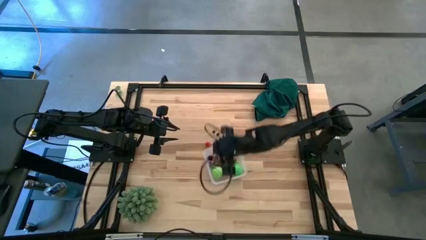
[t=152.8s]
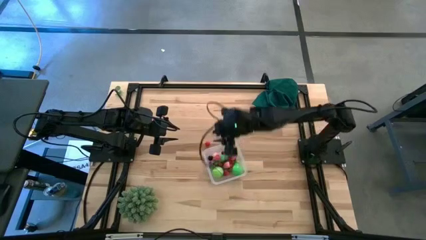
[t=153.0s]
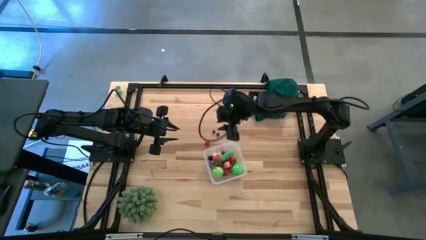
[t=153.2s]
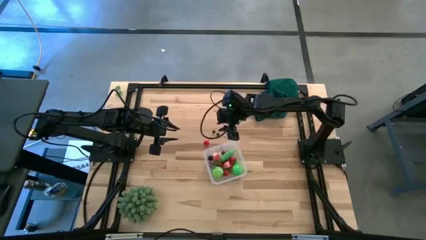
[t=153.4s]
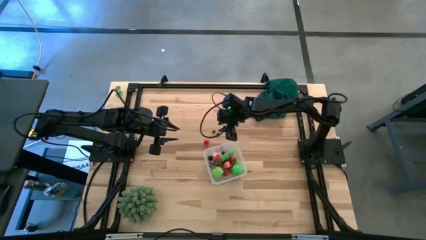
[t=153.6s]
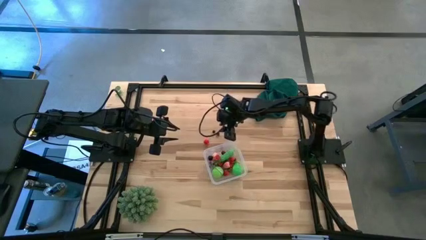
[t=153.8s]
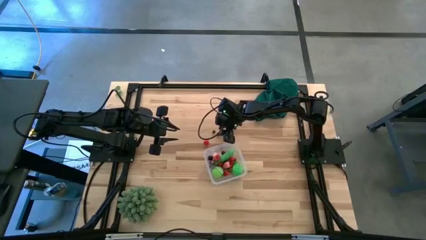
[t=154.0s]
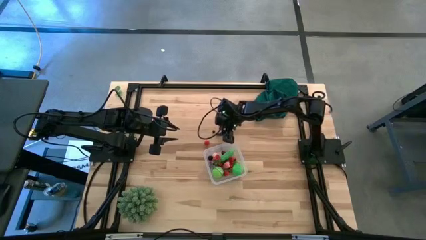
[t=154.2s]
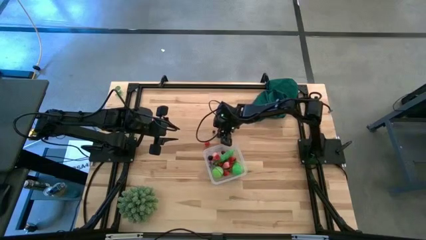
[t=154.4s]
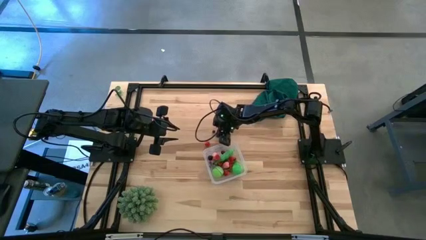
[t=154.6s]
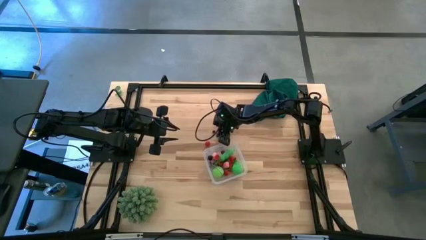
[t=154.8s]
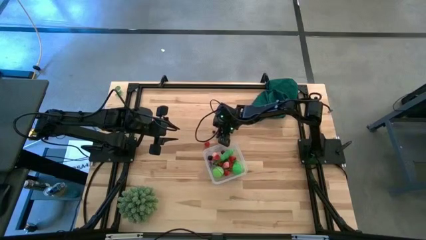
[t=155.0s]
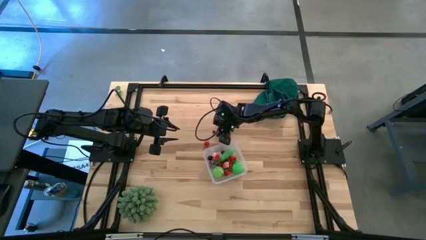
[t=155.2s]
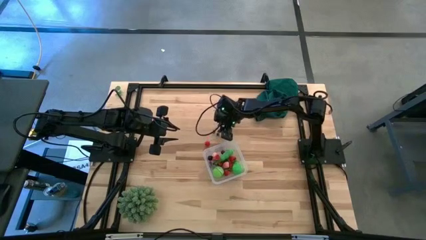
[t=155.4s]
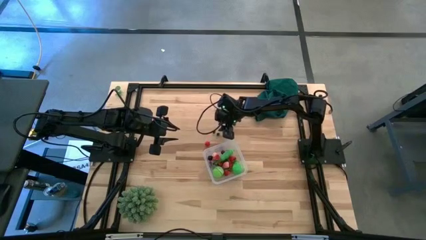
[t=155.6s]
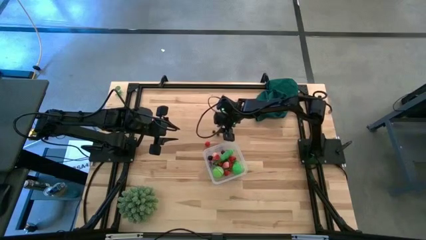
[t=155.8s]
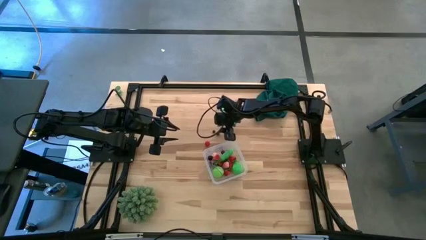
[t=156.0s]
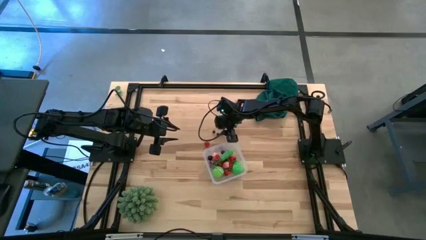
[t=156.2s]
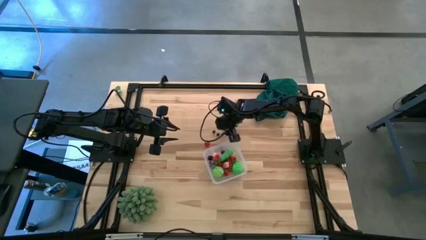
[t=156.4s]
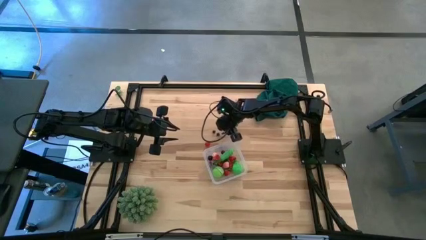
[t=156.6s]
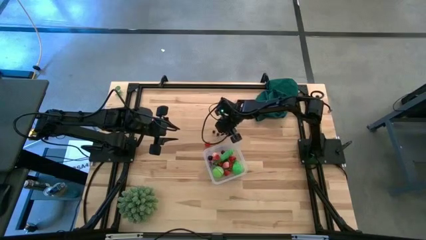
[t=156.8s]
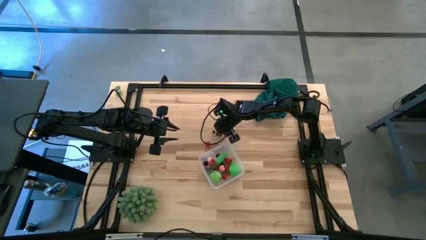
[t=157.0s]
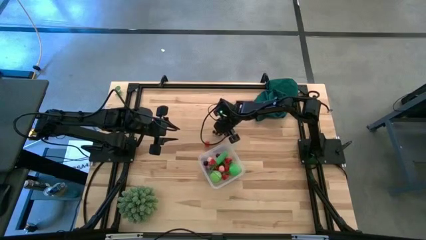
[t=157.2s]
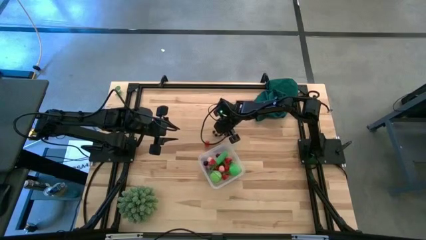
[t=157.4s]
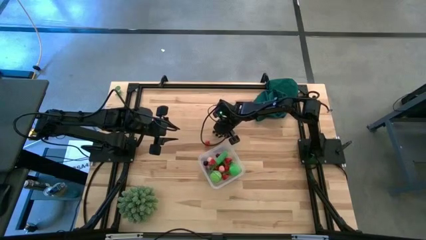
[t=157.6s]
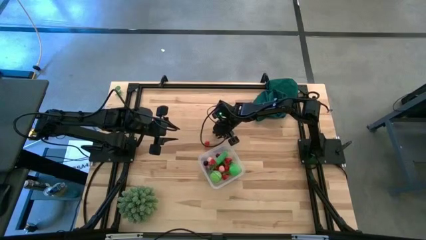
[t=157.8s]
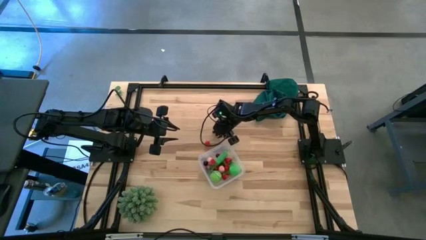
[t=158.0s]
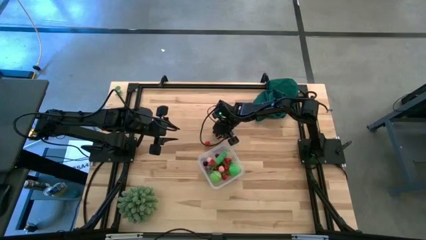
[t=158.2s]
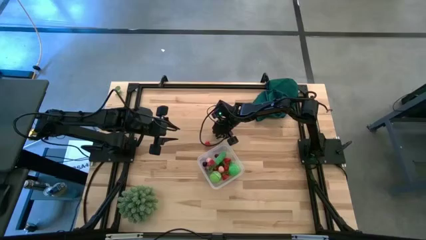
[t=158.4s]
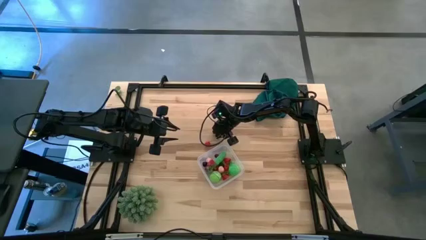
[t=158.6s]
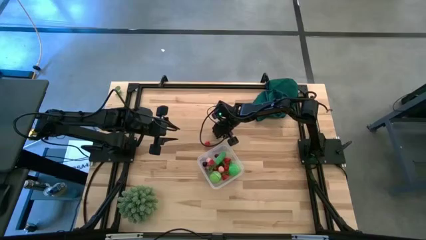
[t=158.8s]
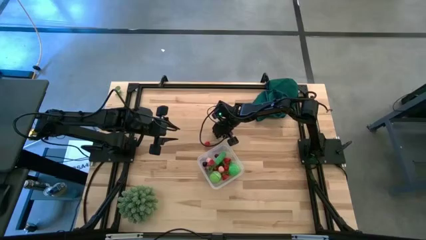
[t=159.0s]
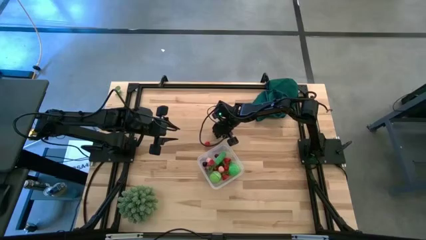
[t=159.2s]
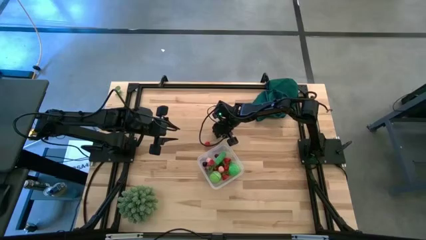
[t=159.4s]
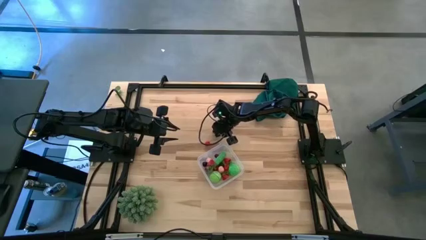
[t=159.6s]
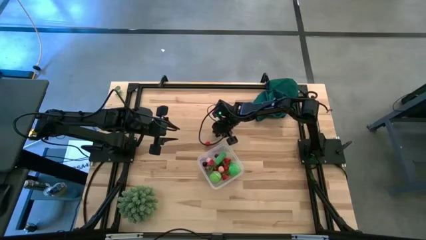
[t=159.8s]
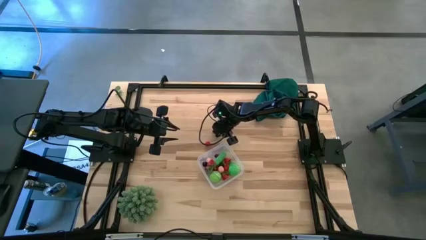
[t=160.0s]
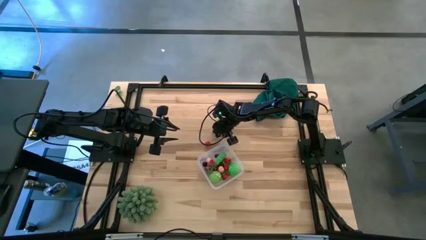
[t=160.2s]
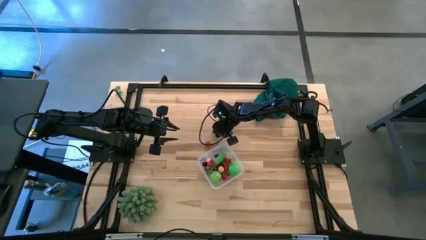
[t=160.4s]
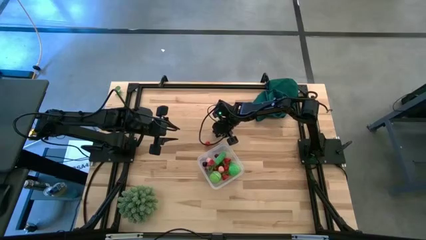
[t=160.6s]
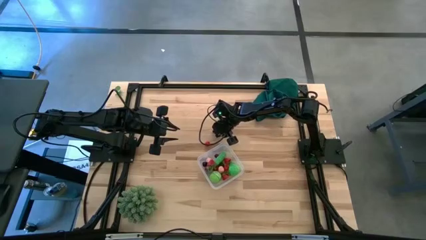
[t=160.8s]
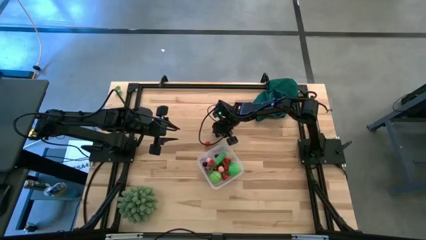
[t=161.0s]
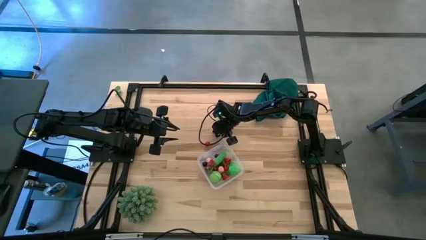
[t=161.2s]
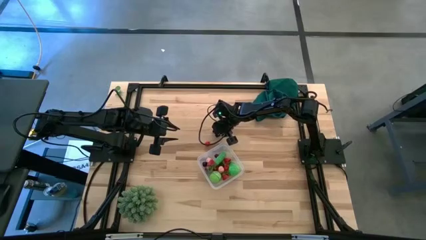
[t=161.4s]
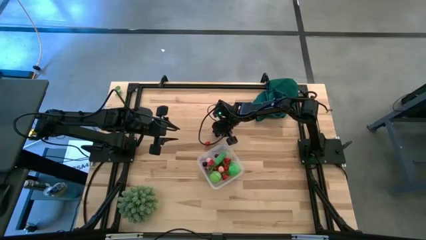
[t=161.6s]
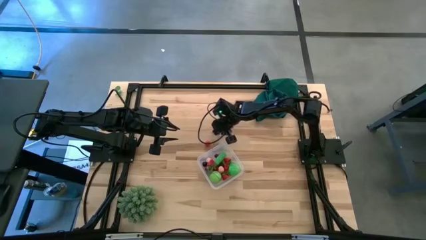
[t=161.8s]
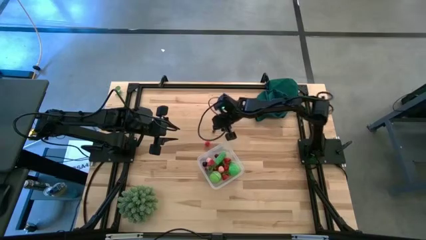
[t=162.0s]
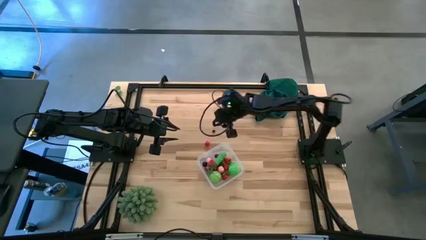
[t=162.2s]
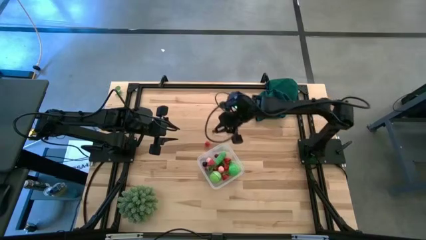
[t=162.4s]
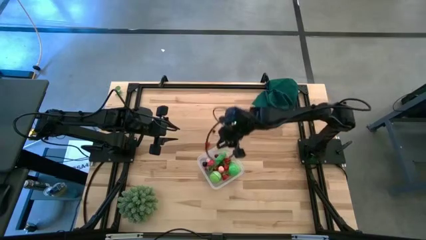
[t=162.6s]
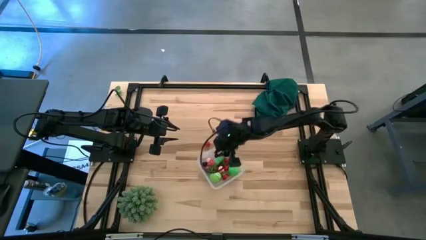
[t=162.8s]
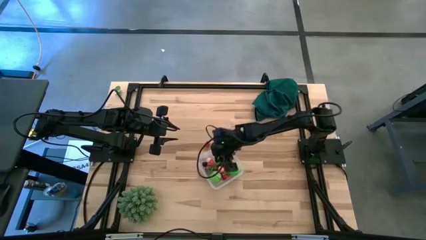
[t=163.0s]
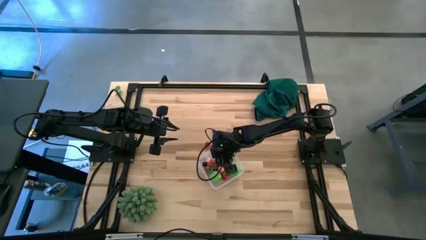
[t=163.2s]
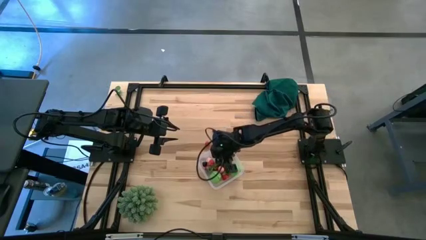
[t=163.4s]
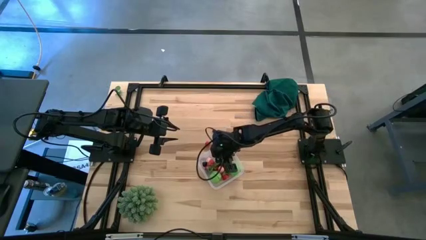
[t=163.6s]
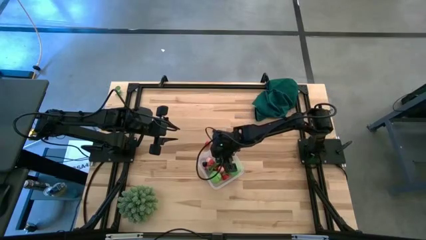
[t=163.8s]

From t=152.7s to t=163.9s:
Task: Pick and placing Produce into tupperware
Put the blueberry into the transparent container

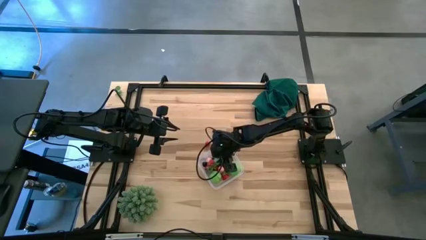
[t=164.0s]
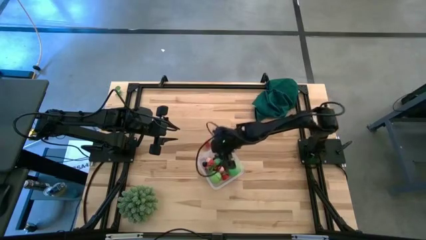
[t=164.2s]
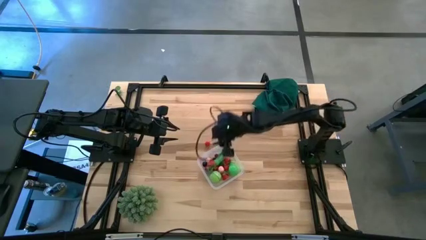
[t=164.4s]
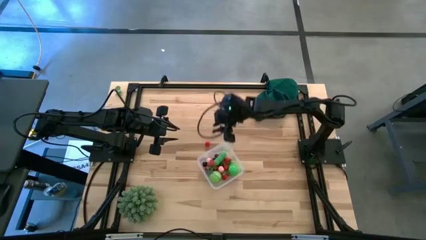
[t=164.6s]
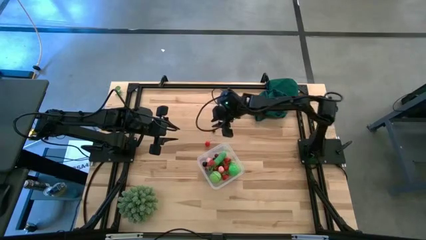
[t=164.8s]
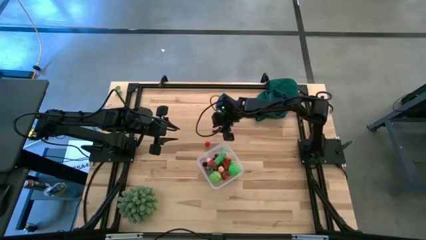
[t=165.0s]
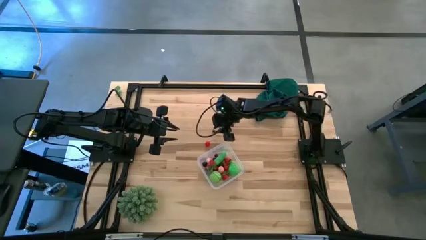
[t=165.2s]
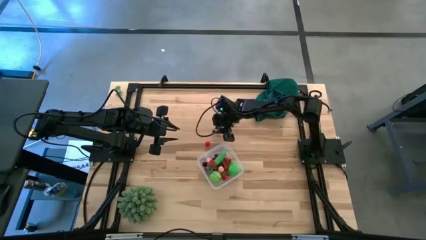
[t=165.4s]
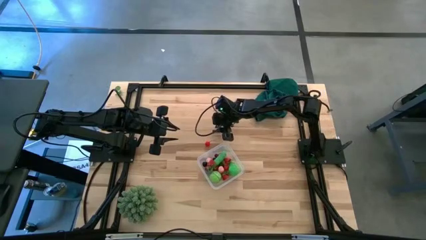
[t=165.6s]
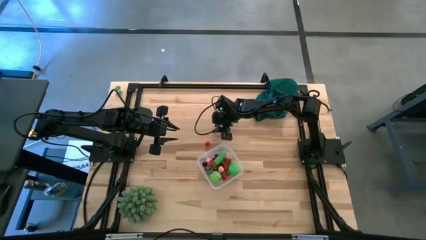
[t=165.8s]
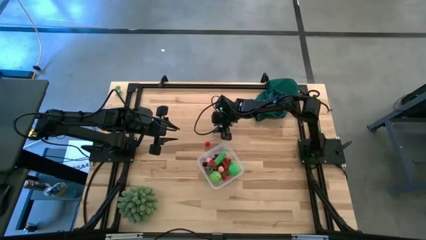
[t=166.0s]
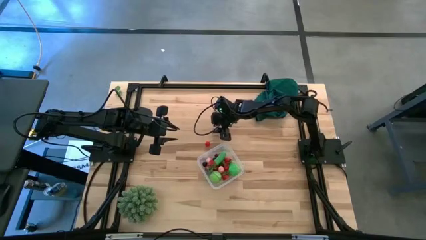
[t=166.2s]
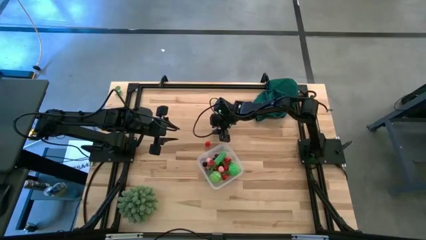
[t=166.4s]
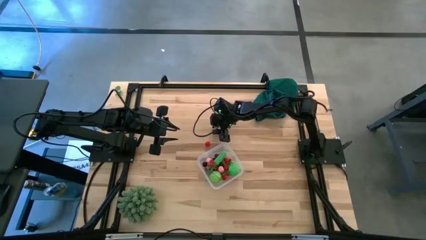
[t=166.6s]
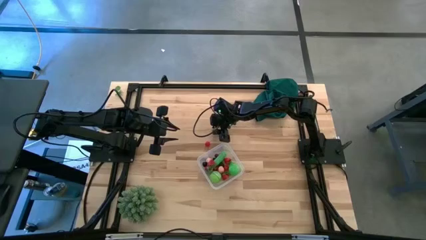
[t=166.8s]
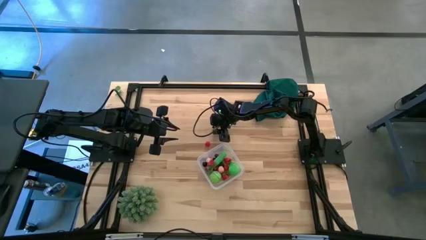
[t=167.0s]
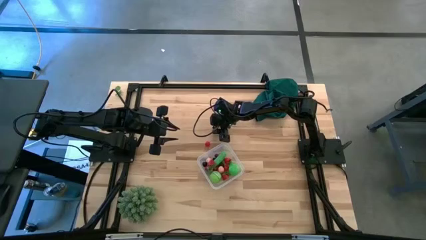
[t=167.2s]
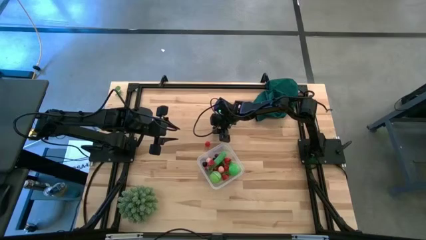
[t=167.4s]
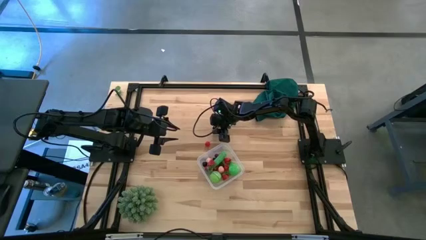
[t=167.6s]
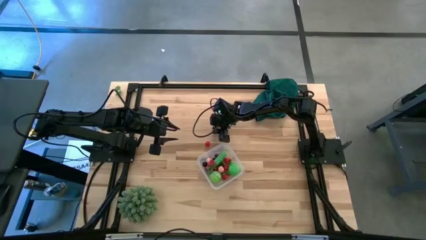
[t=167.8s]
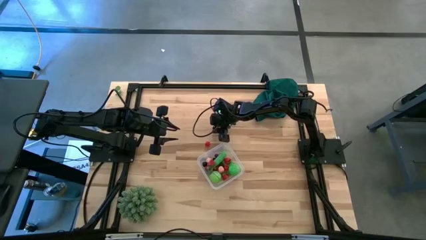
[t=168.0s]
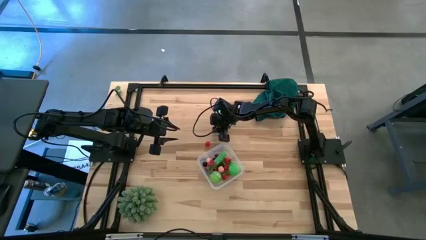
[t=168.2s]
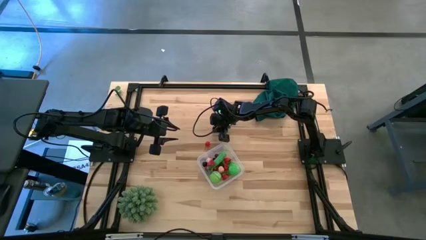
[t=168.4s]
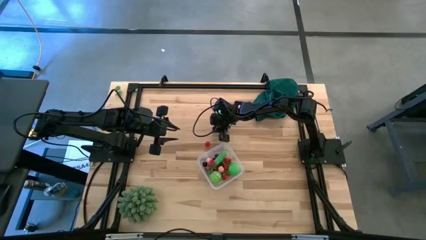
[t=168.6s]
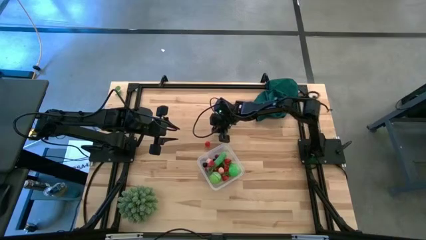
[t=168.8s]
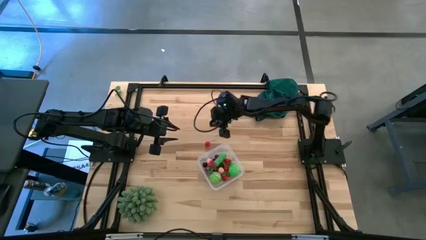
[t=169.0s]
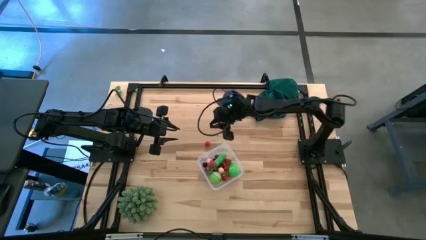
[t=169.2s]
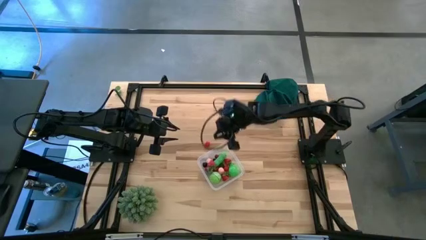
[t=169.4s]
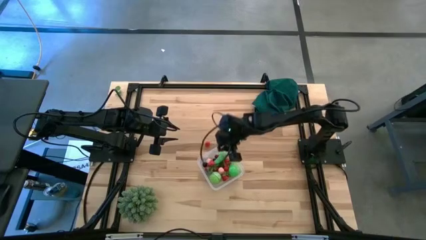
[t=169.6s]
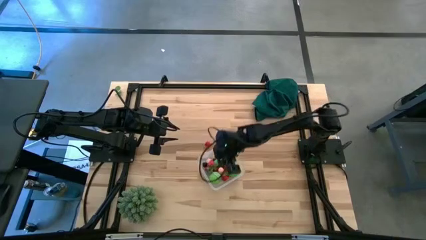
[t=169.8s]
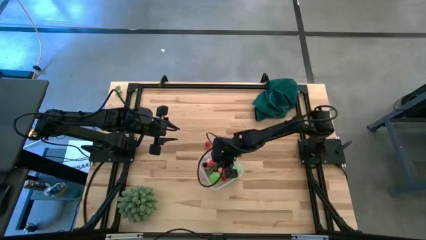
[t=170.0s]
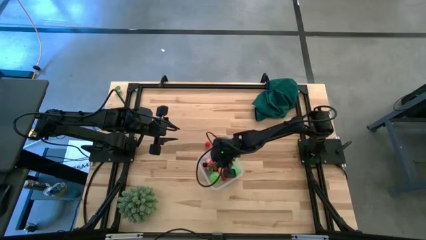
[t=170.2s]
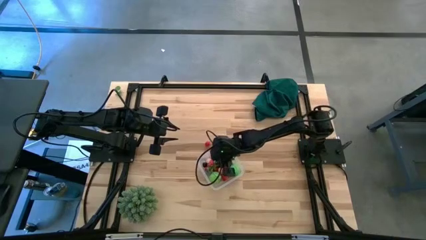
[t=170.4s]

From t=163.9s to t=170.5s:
Put the blueberry into the transparent container
